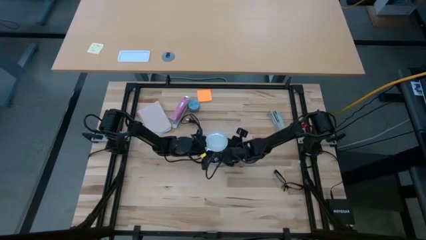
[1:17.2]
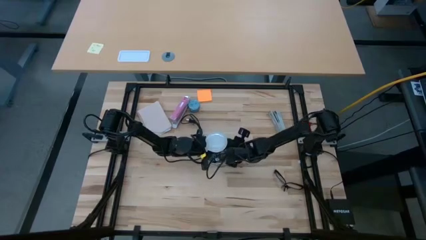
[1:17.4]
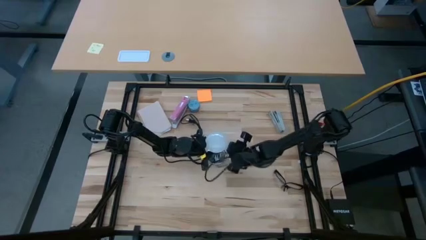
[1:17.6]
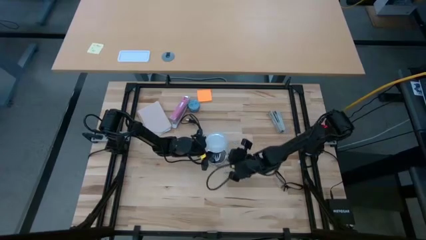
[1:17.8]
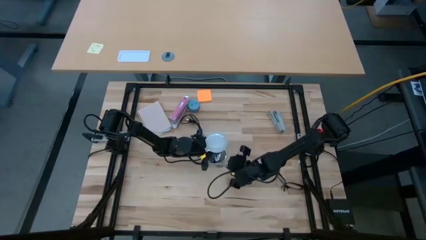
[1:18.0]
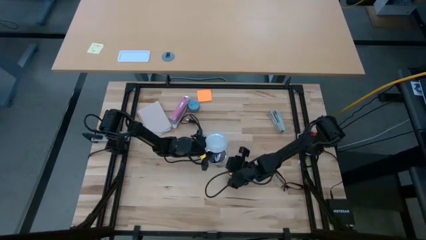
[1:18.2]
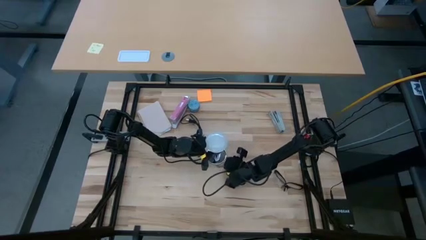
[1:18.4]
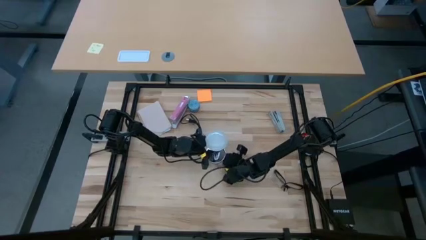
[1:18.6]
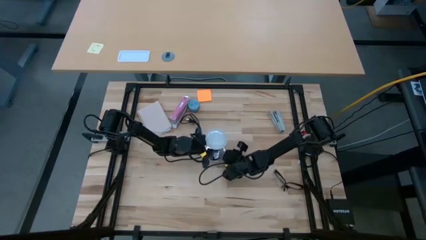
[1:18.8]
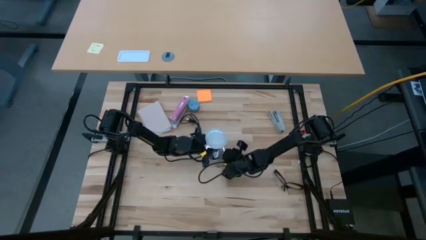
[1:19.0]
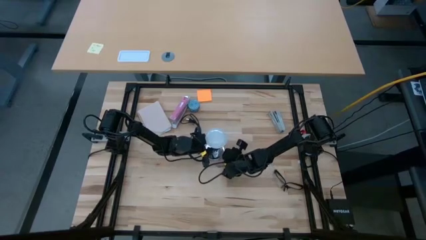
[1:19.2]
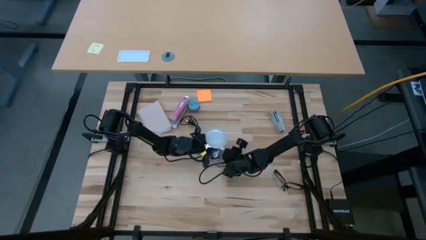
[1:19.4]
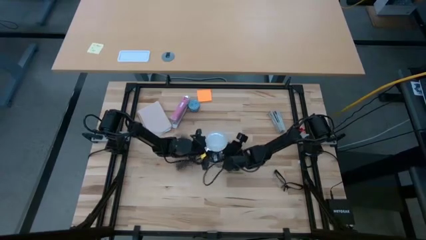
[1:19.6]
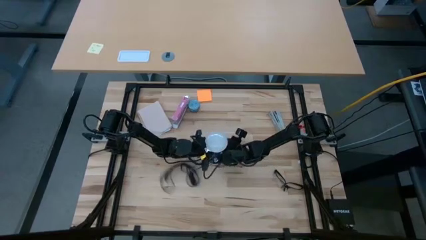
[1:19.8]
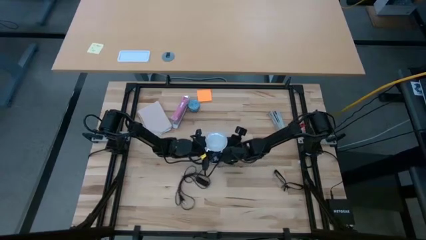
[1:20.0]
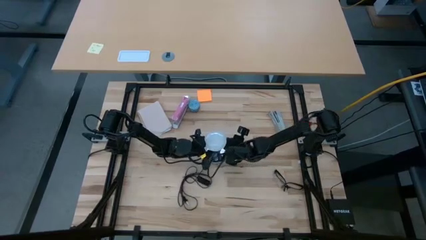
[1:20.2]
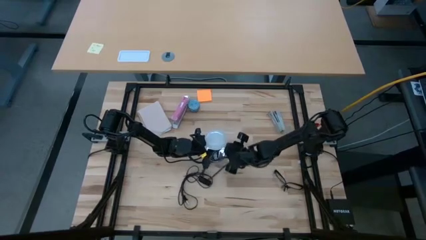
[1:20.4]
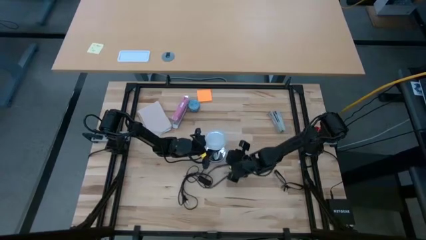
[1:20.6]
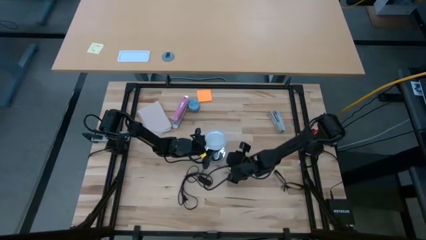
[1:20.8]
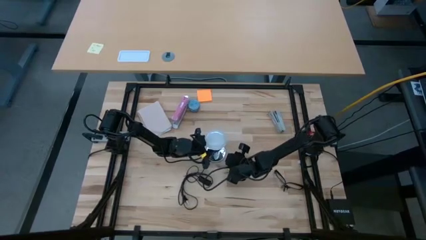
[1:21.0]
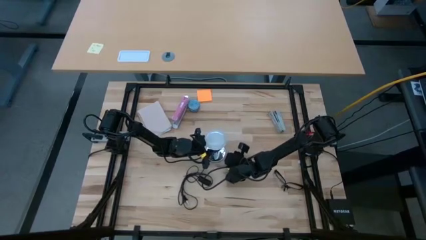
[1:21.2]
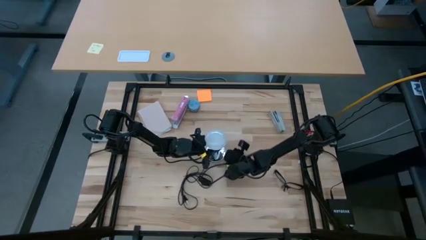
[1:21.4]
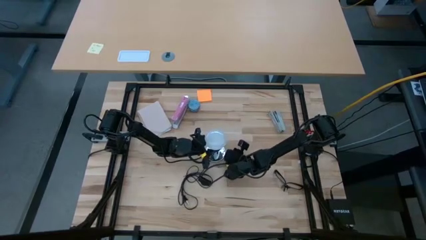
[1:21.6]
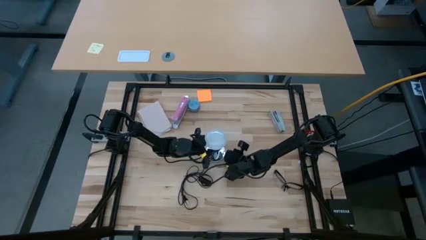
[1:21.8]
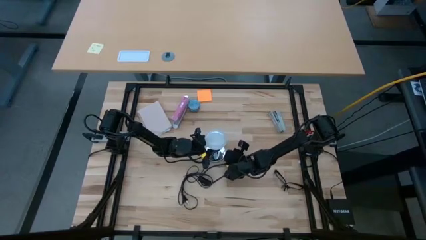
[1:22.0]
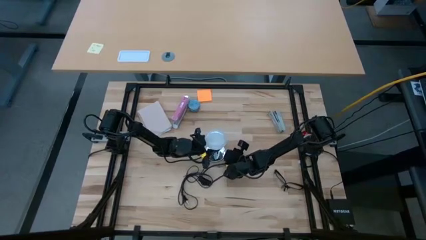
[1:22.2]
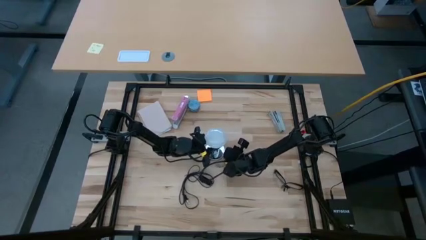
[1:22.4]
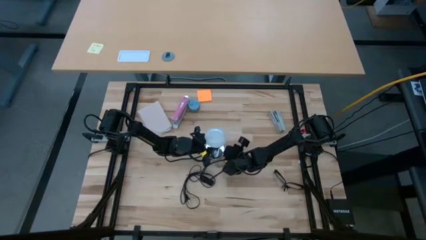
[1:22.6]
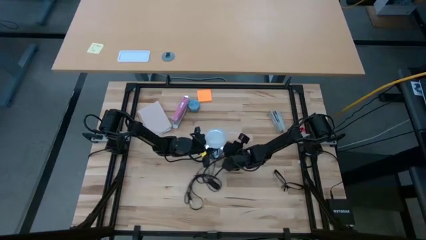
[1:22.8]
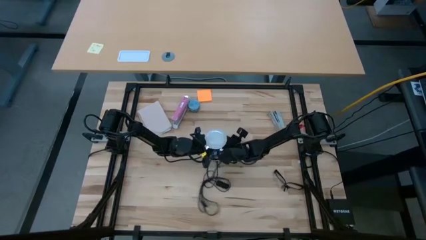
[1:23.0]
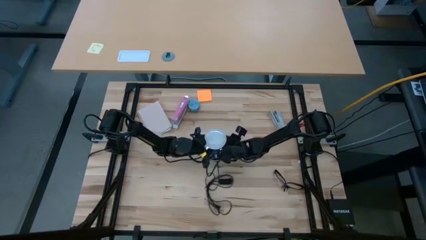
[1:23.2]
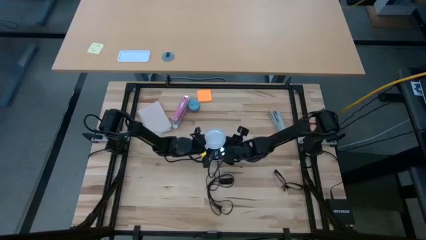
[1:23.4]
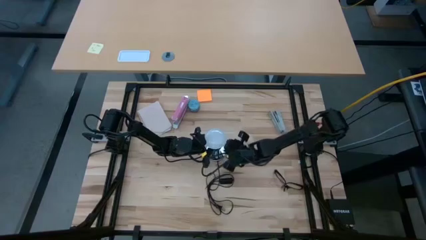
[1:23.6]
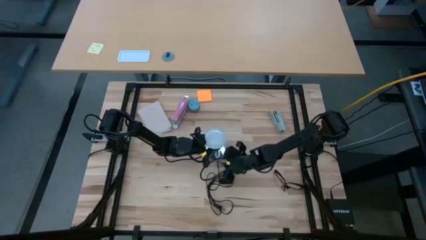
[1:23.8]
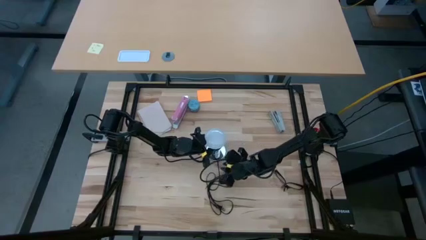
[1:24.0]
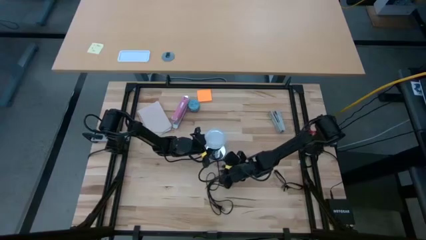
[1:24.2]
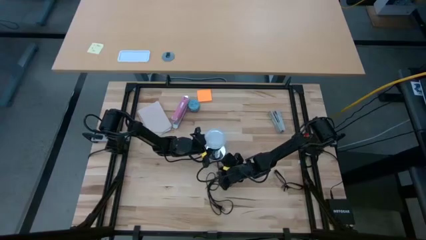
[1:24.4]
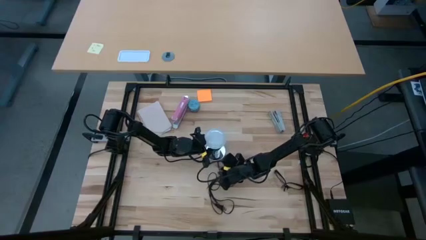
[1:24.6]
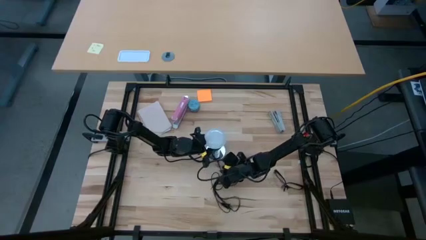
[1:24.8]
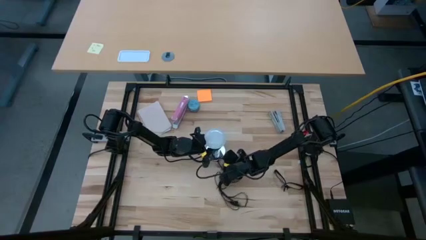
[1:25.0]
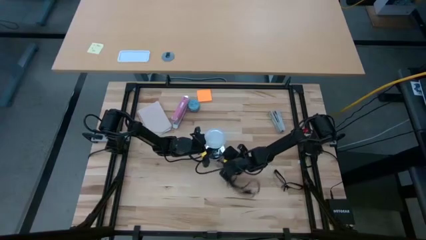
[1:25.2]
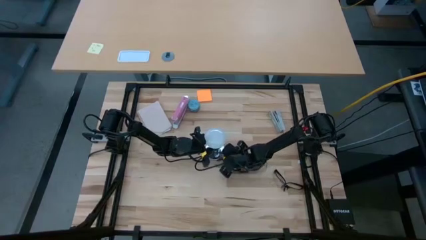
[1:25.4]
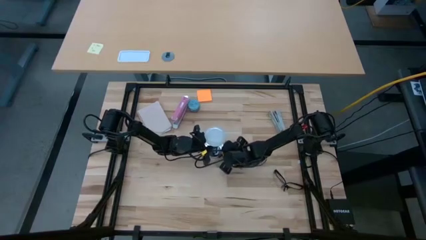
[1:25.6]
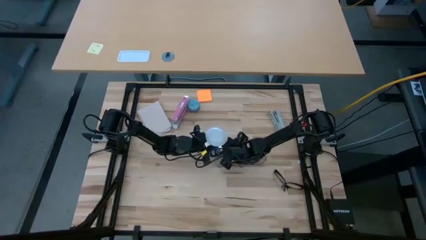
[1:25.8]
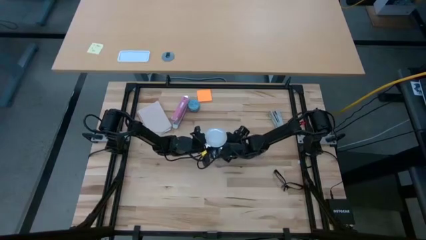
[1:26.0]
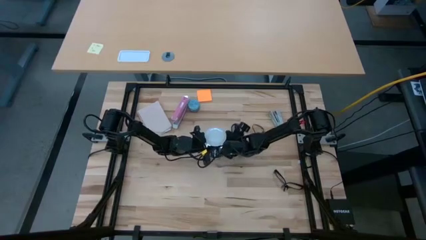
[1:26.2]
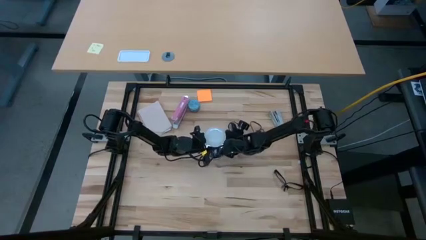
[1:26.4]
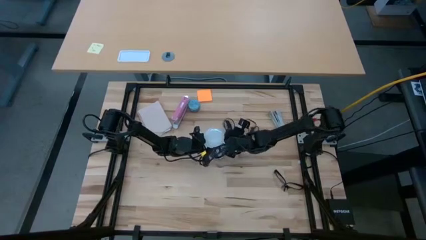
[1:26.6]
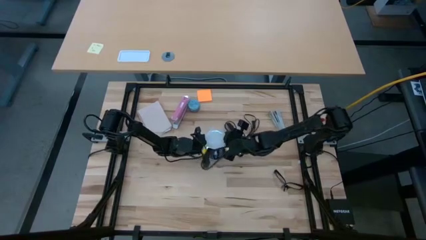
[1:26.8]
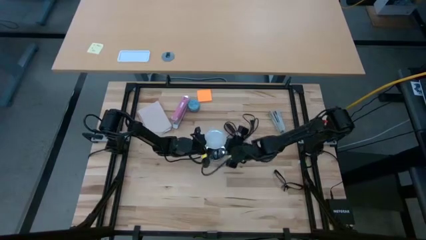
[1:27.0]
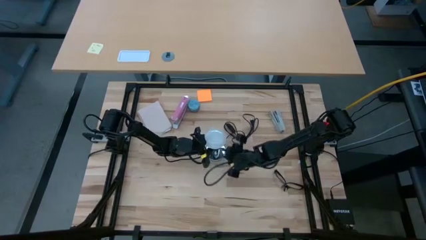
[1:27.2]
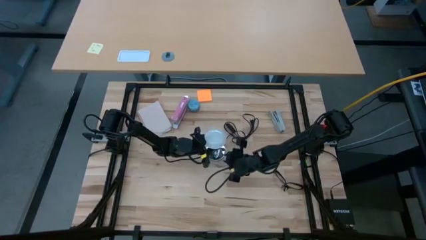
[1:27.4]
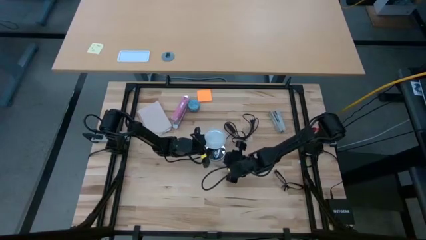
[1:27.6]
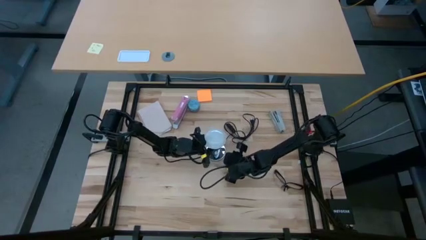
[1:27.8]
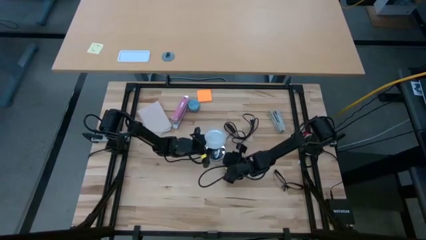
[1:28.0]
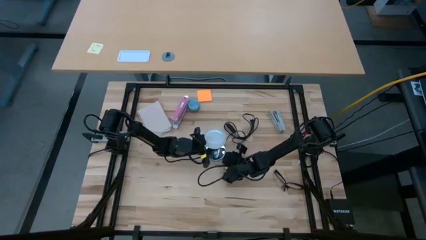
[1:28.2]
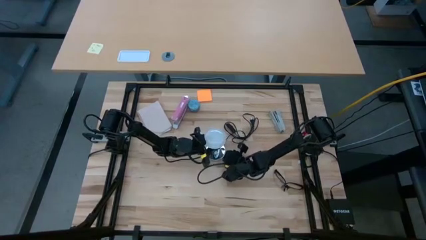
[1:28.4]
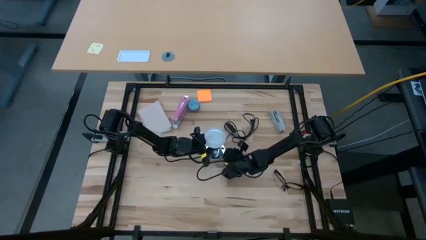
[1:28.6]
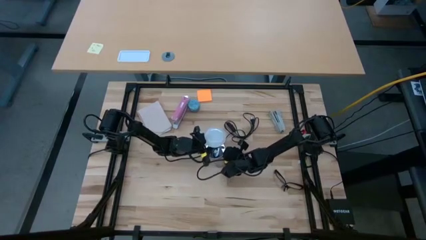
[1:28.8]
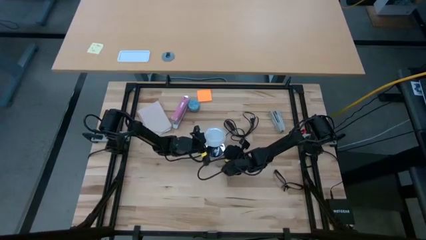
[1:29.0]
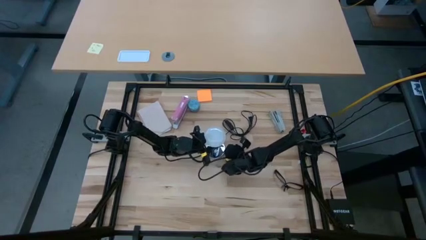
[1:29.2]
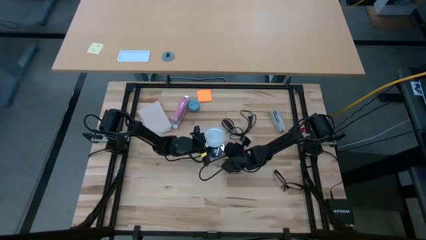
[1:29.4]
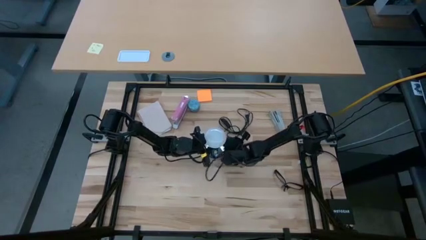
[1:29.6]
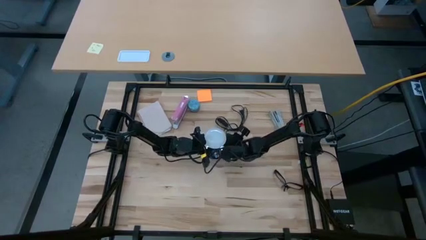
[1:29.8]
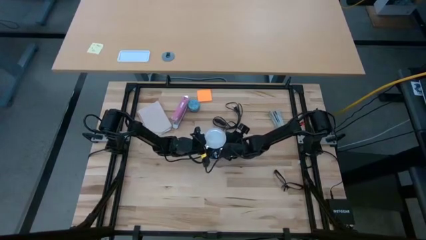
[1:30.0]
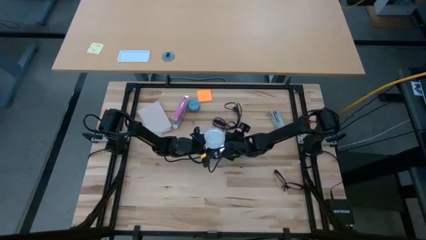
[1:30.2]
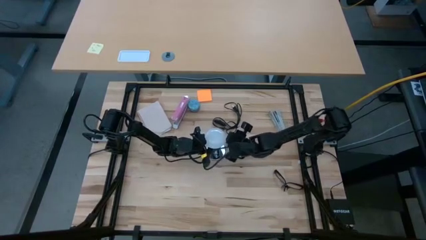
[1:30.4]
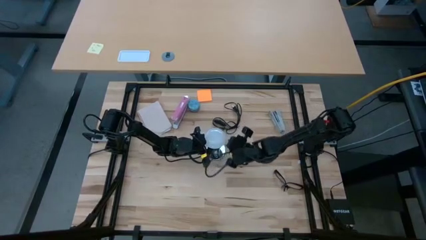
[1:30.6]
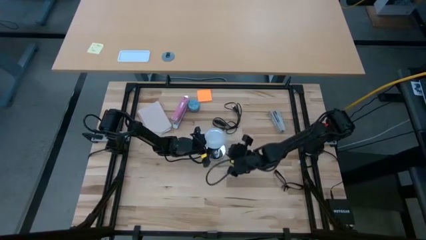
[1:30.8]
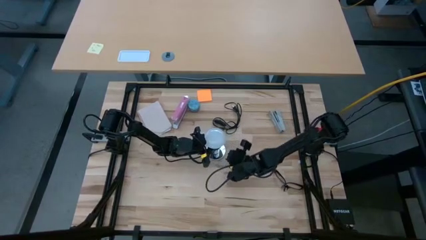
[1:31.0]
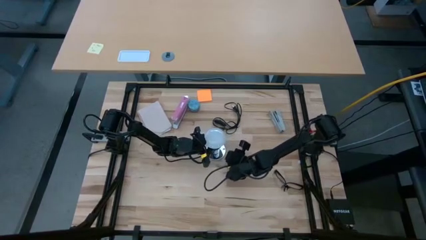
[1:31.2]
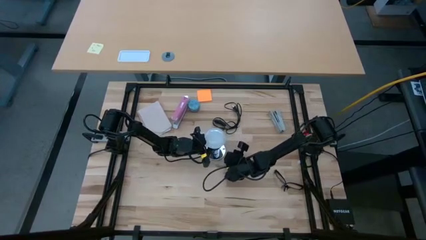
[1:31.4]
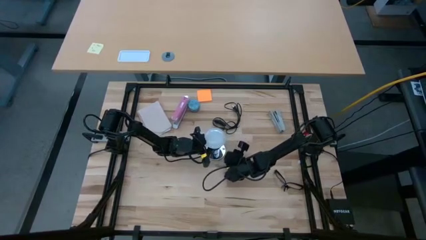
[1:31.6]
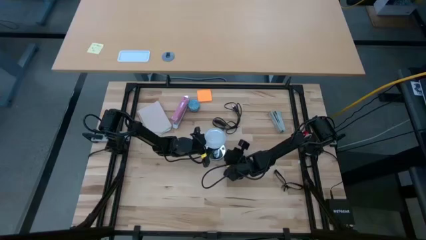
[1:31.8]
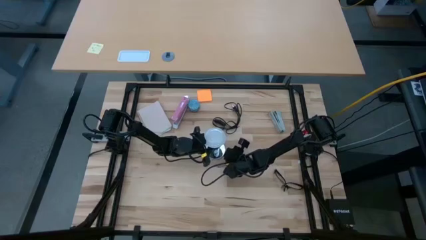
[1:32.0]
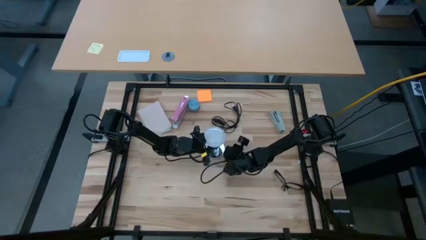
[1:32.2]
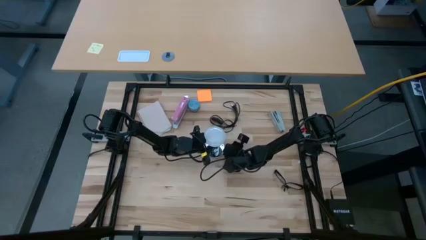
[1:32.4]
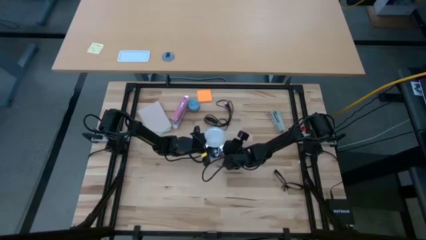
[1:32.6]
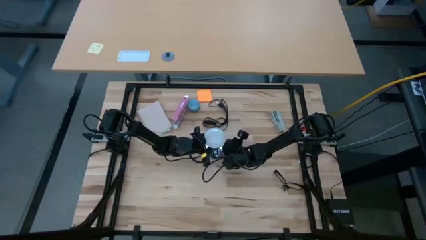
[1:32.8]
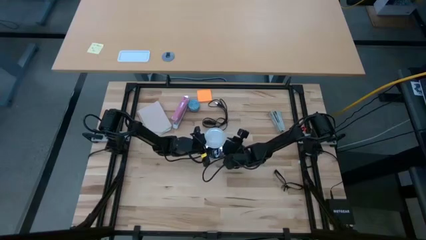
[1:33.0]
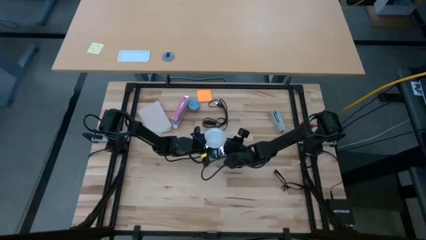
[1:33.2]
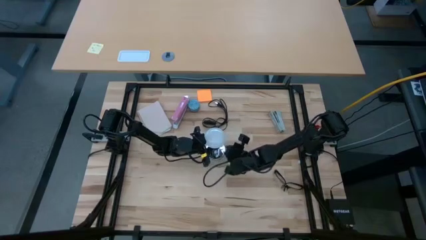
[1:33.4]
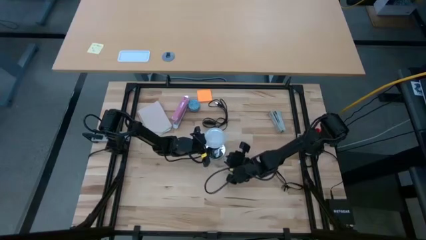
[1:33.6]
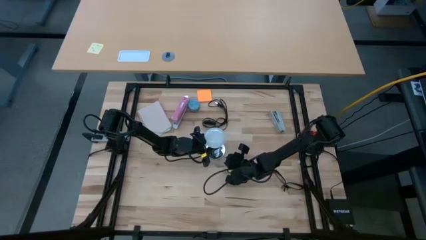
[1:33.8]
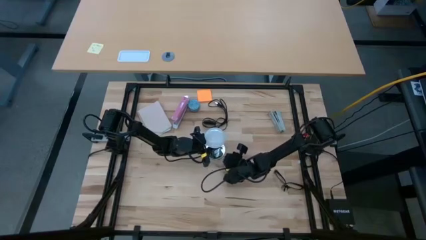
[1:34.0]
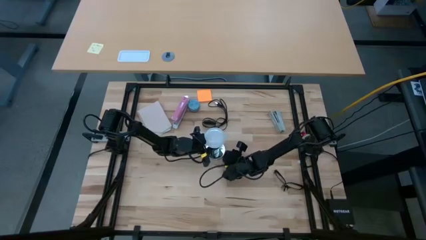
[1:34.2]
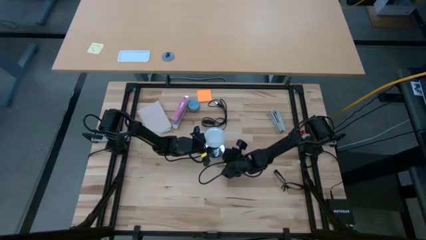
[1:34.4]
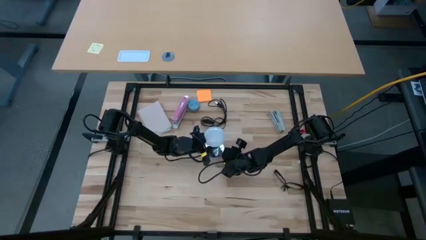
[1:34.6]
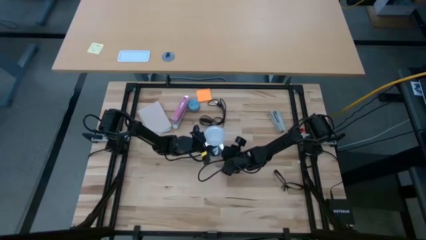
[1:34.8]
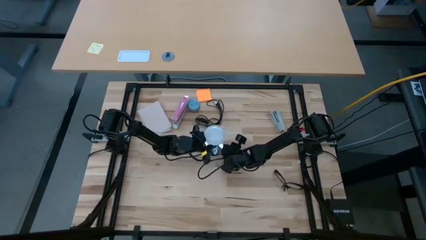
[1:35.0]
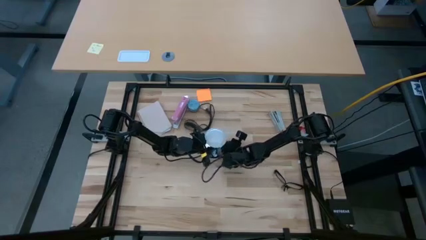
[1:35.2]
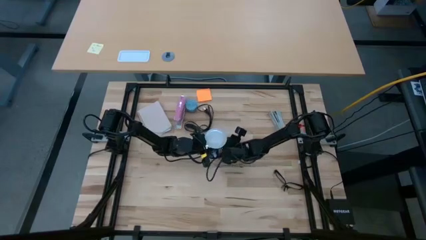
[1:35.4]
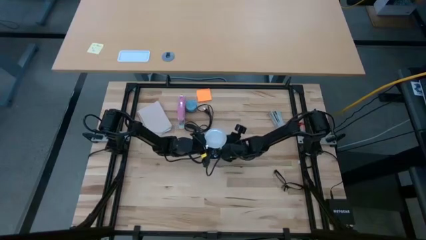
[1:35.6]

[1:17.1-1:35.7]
Task: Screw lightbulb
Insert the lightbulb into the lamp
